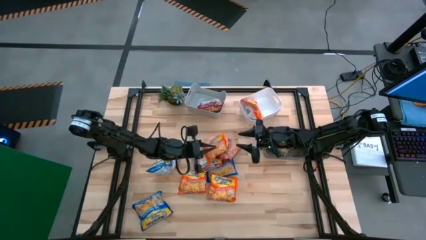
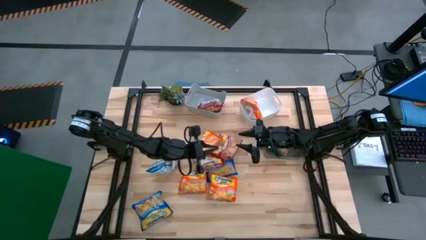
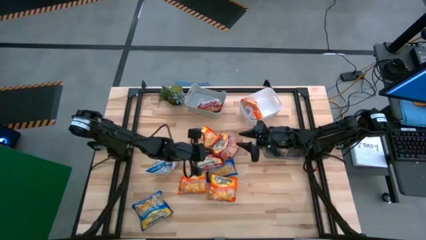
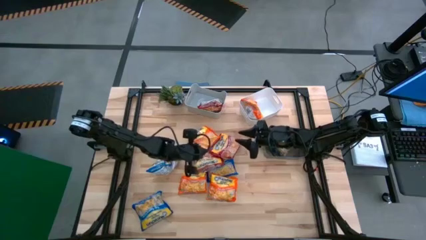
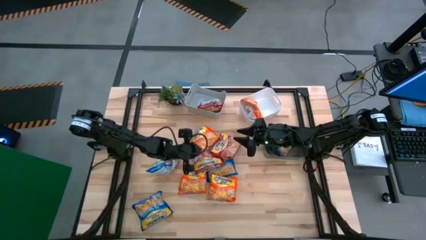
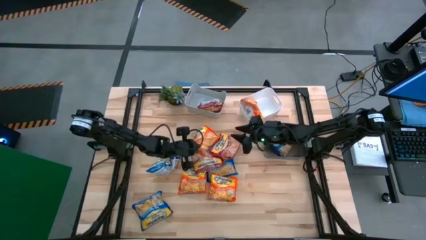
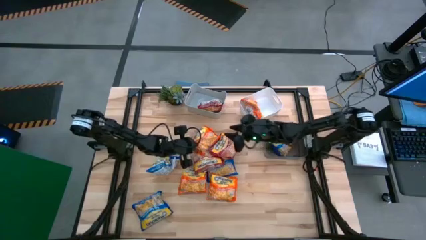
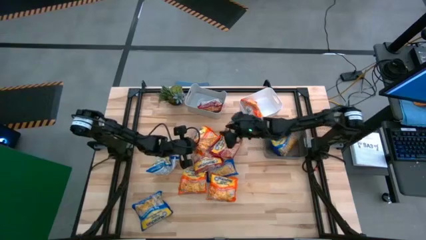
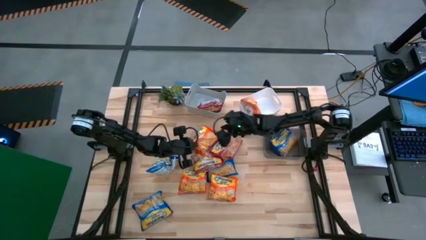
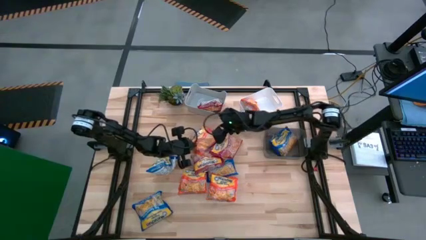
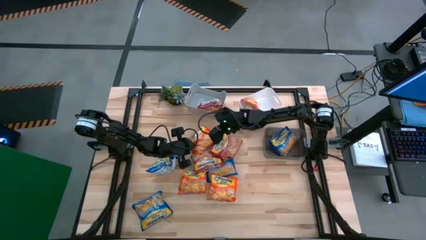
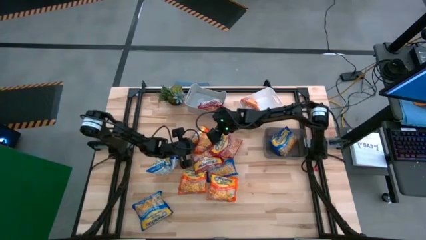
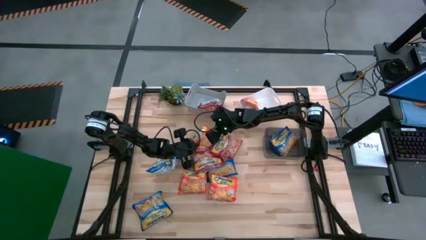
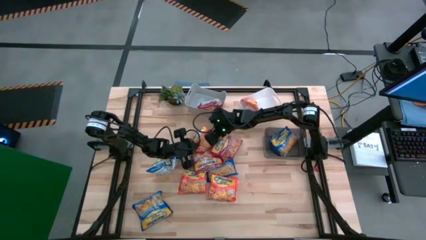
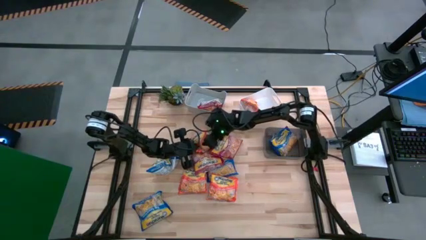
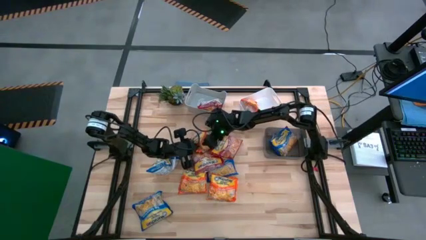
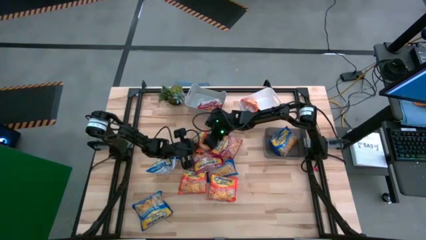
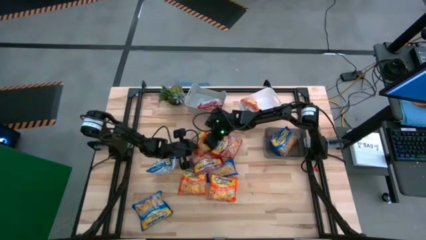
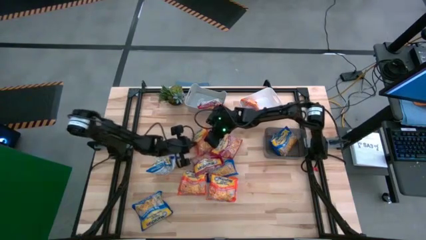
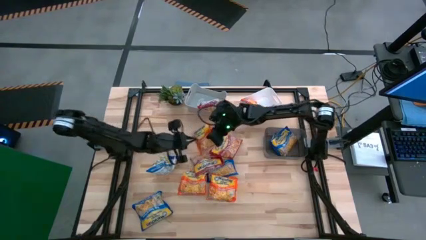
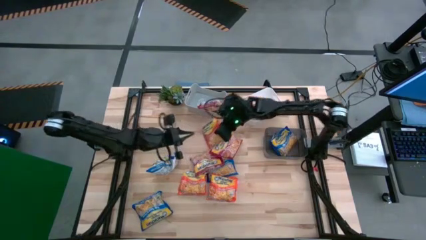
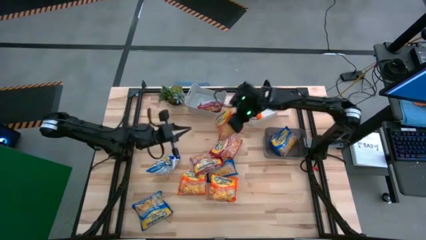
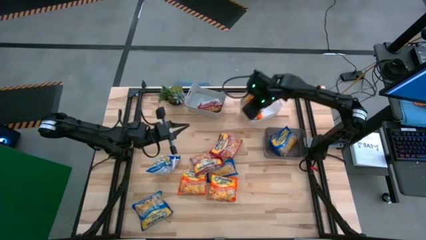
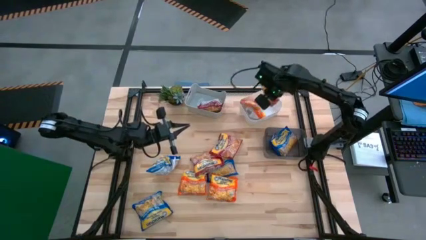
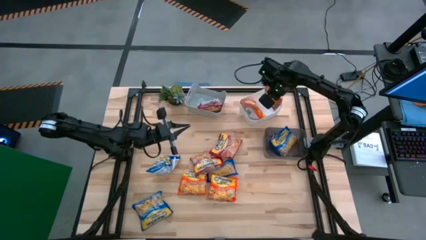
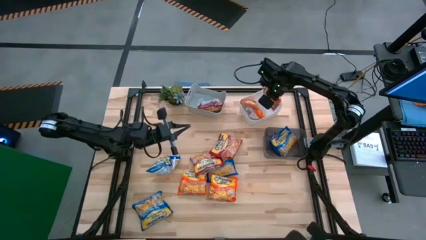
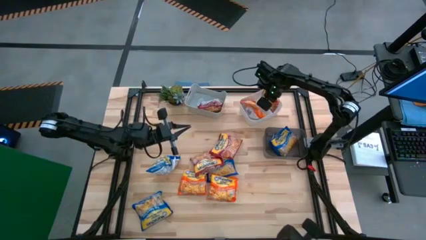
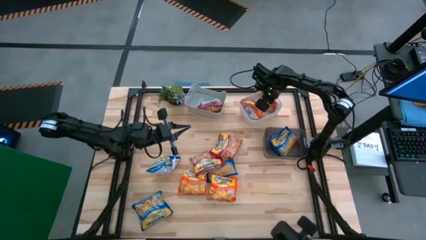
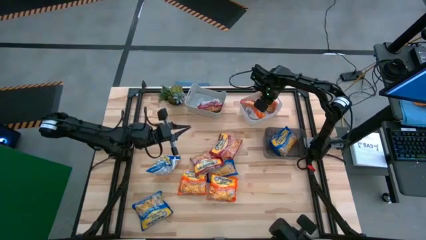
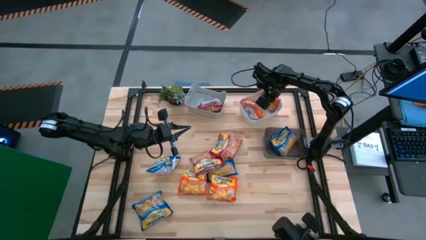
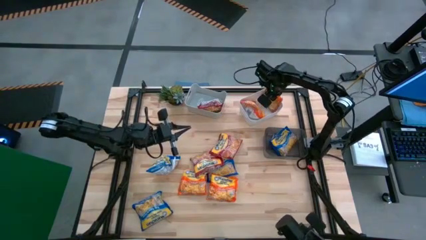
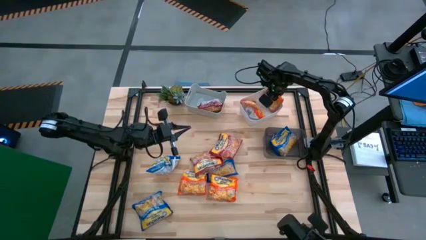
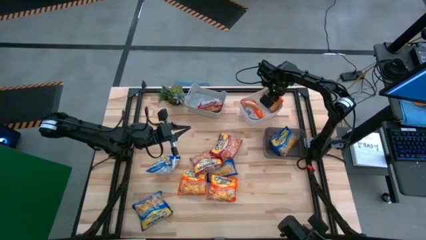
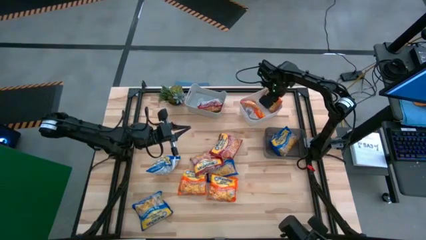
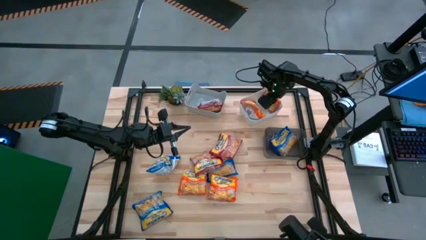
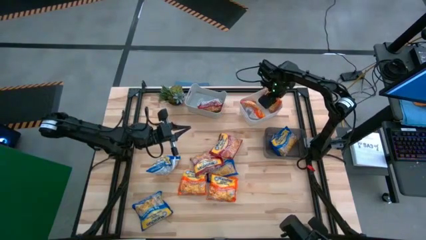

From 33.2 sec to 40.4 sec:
Task: Sort Maruchan noodles
Put the orange noodle pack into the white bin

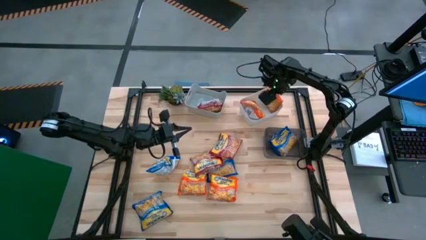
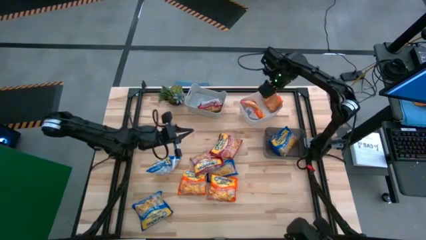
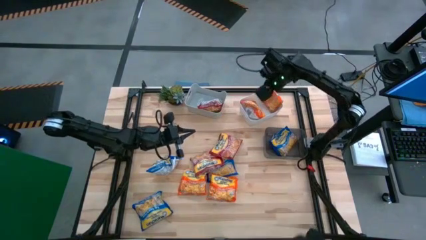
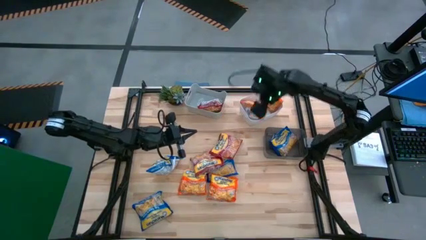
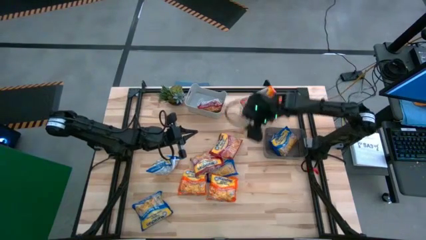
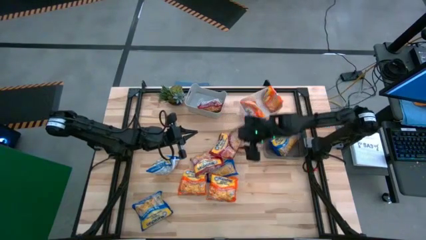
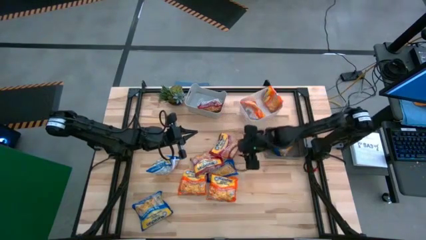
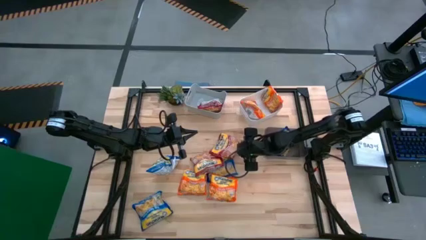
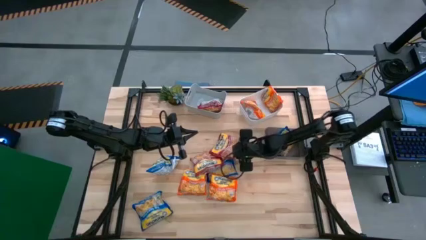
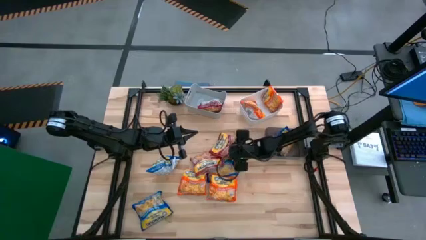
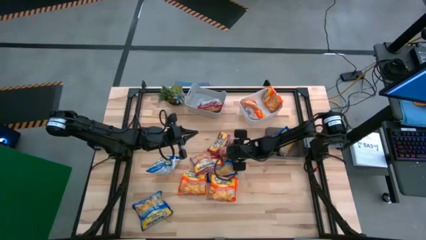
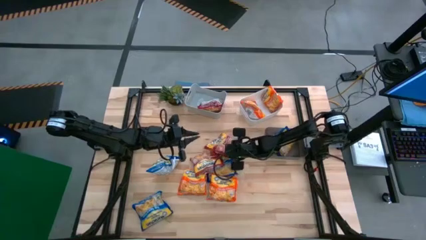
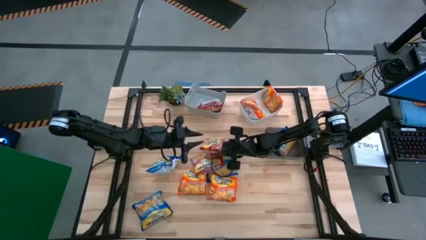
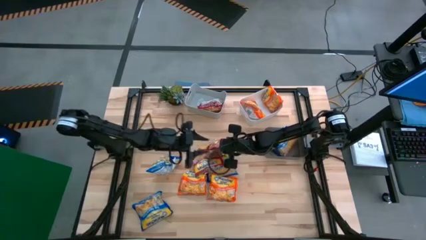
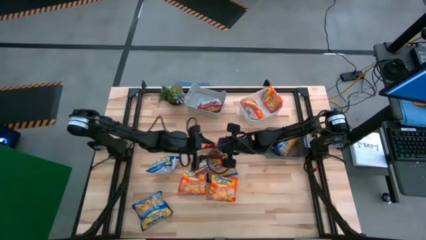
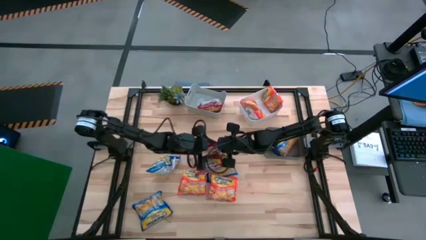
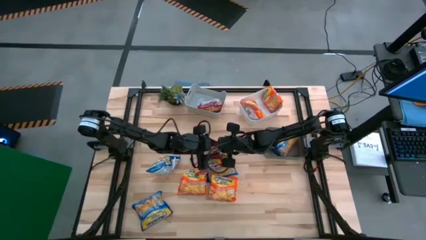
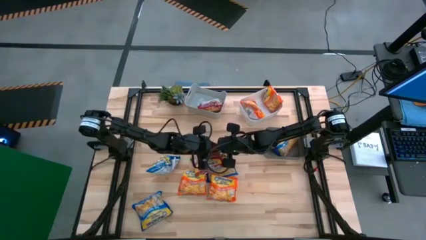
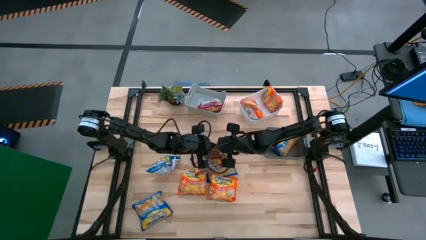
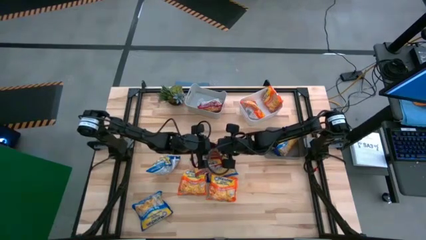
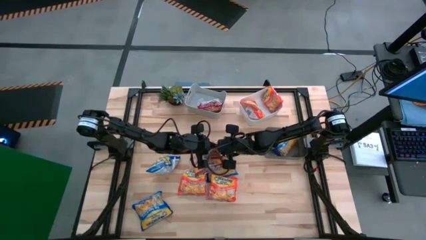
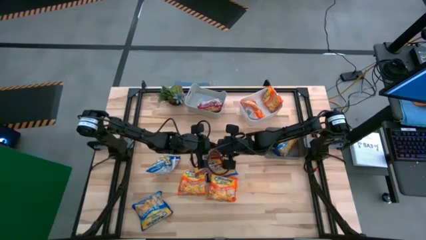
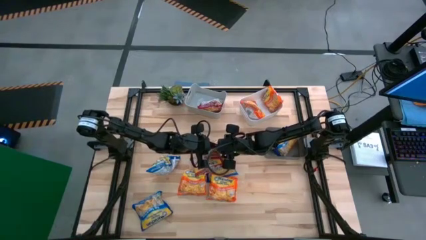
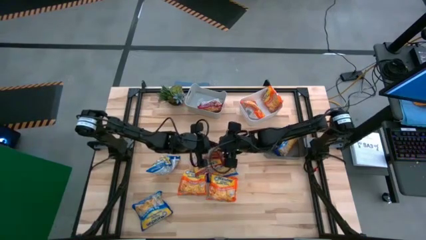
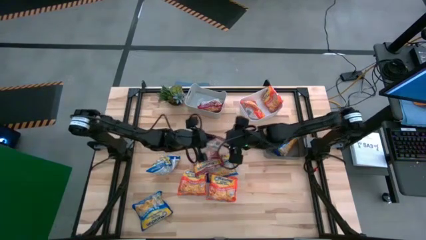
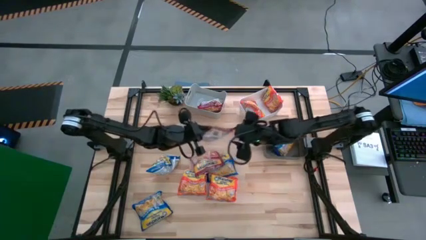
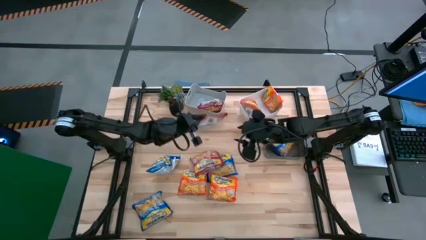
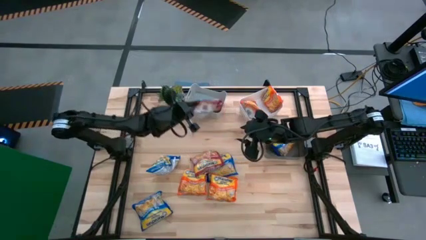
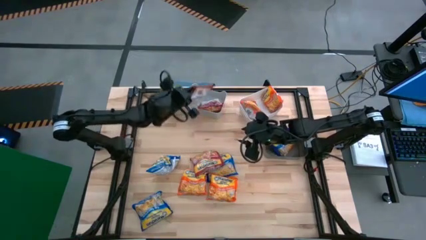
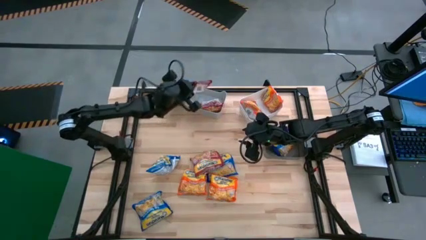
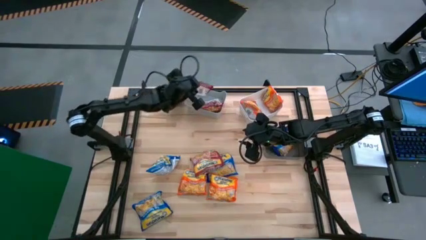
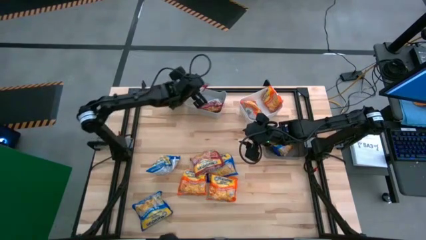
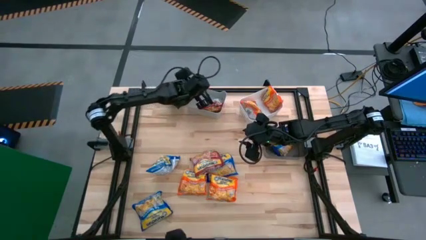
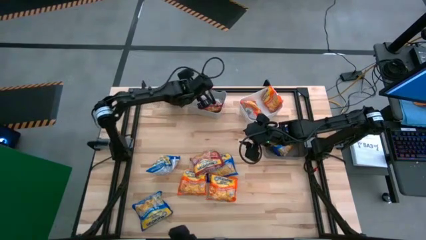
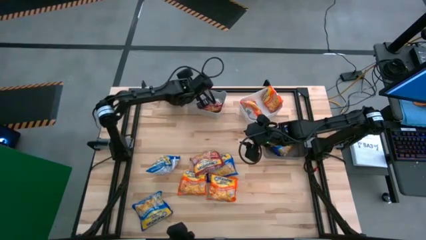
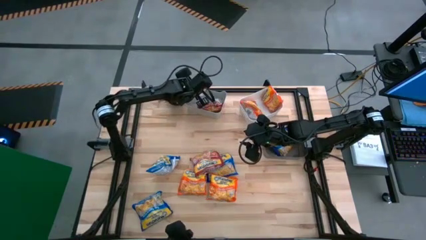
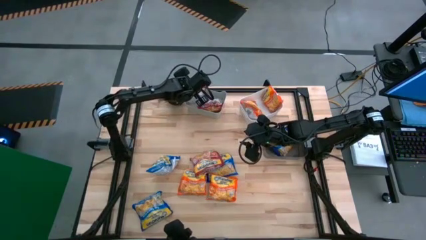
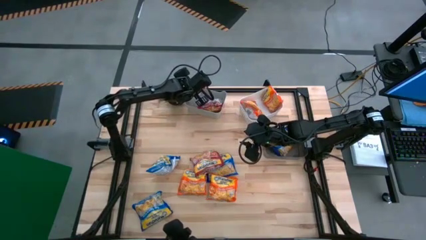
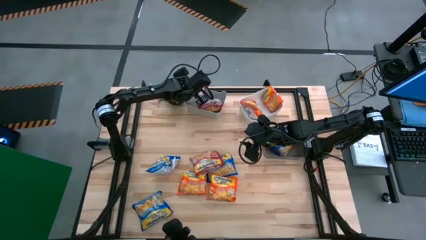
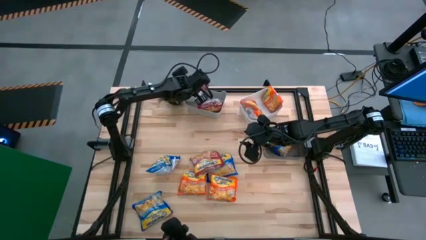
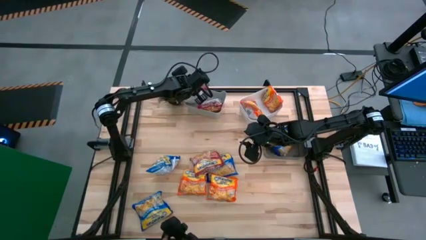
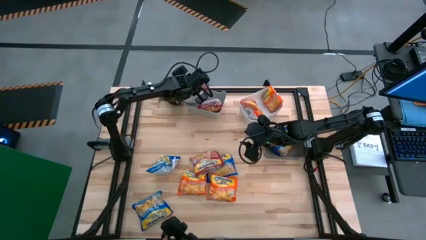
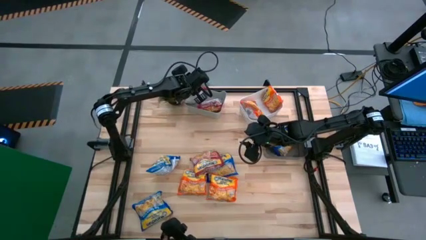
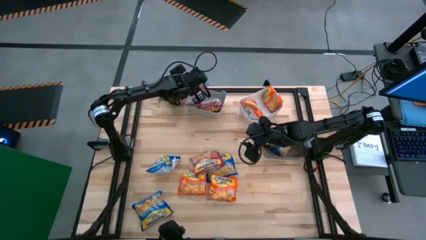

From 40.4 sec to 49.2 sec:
Put the red noodle pack into the gray bin
